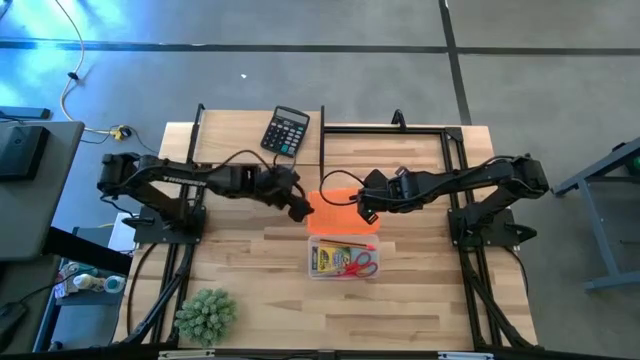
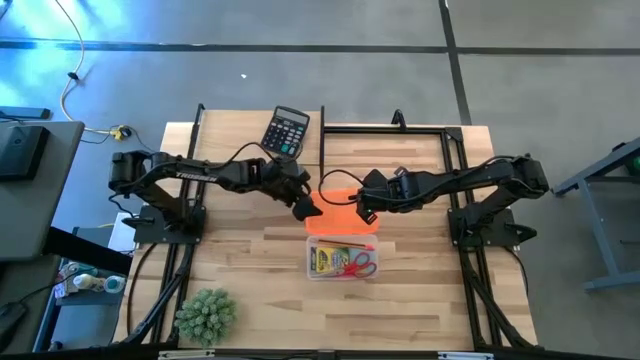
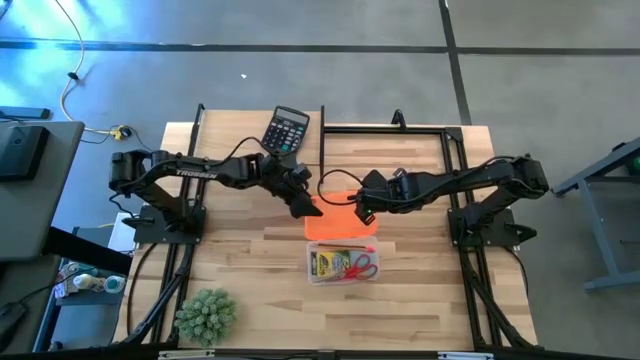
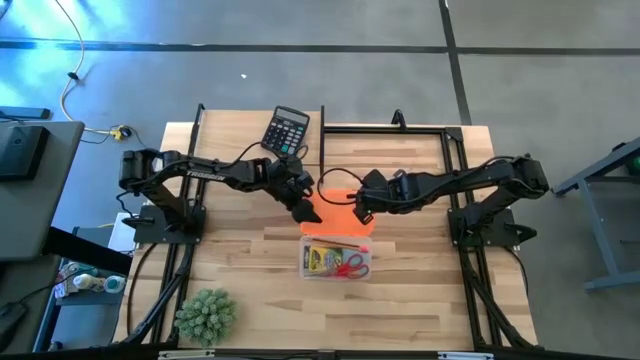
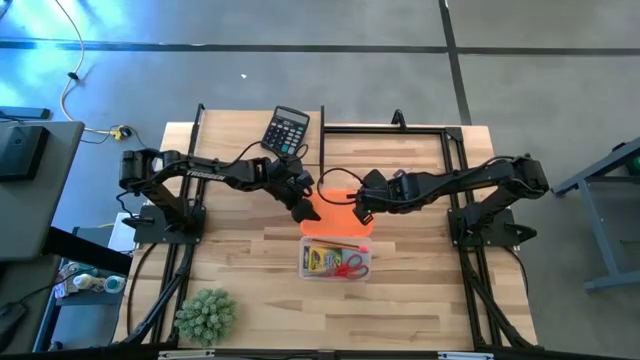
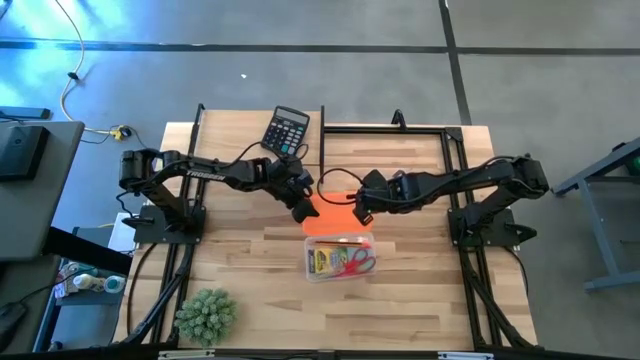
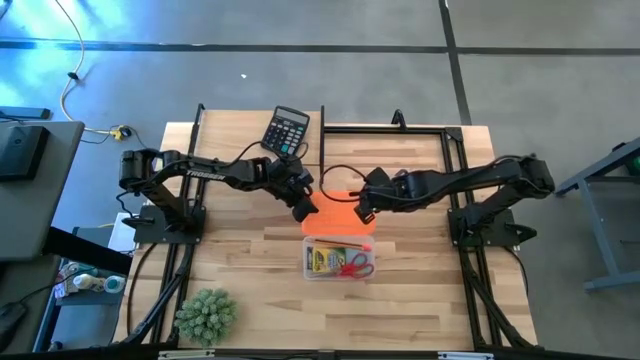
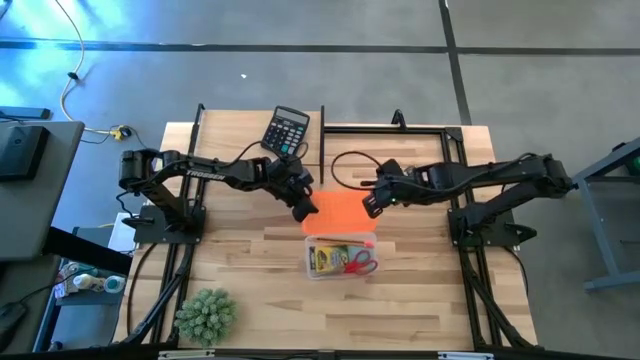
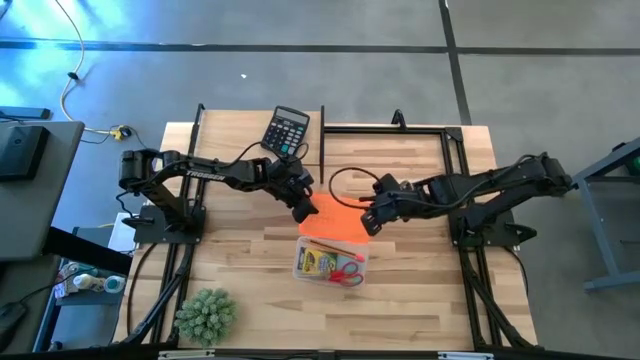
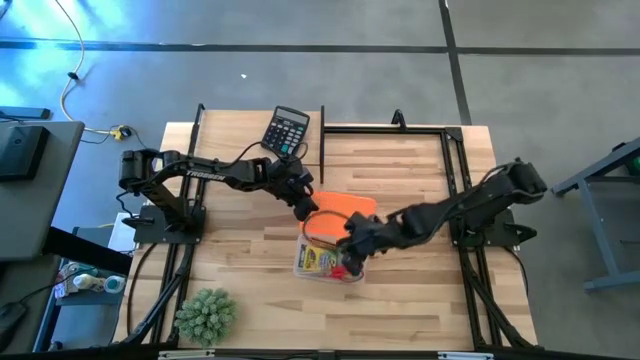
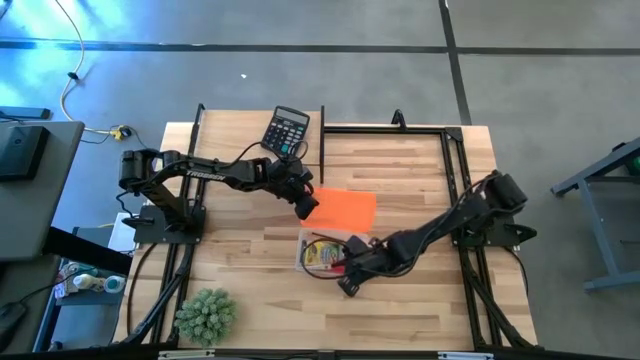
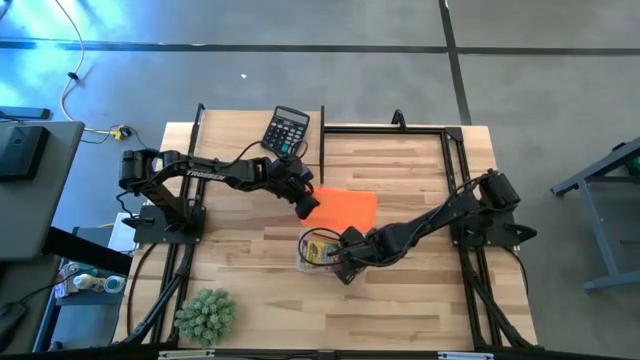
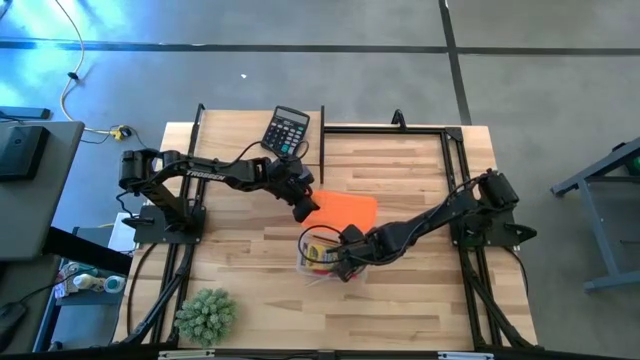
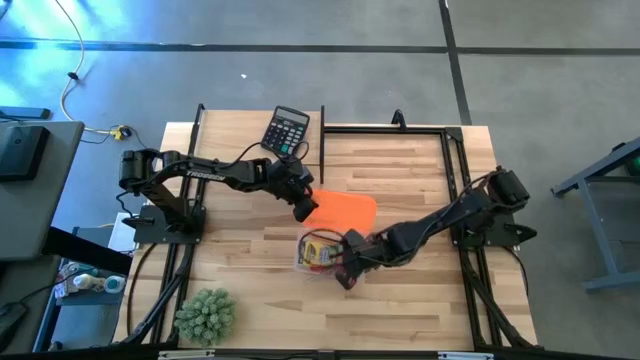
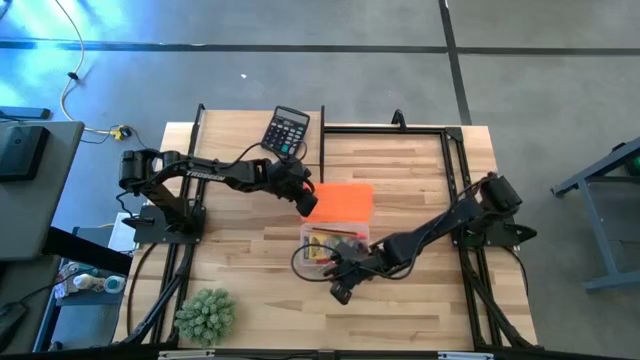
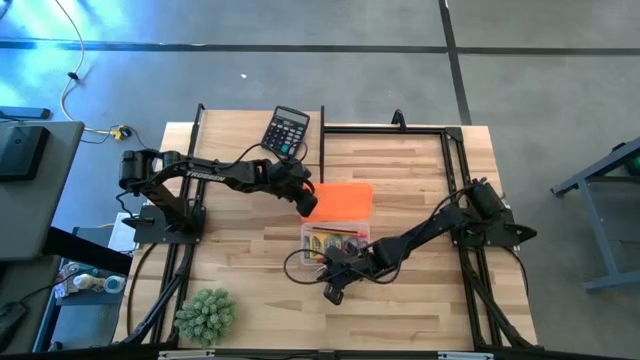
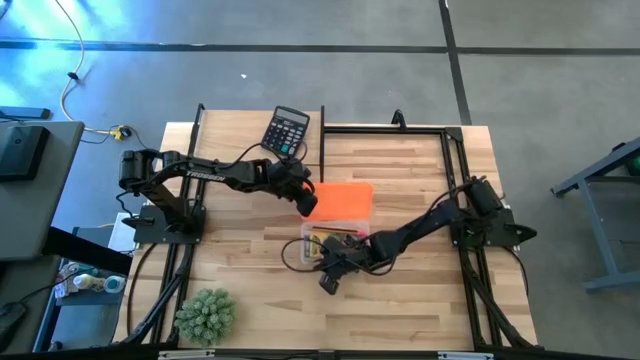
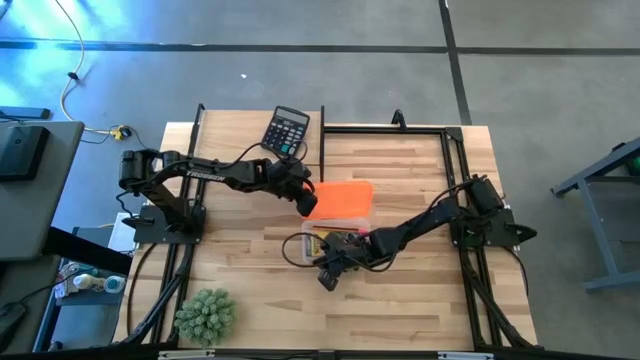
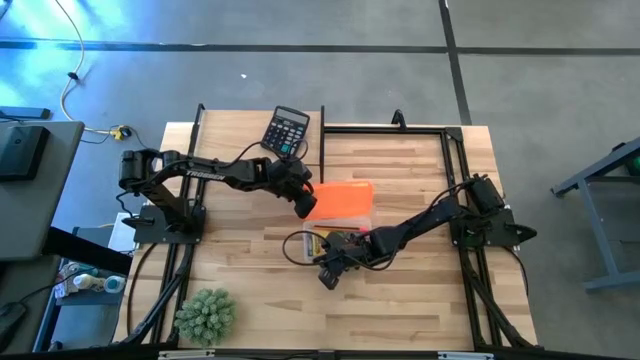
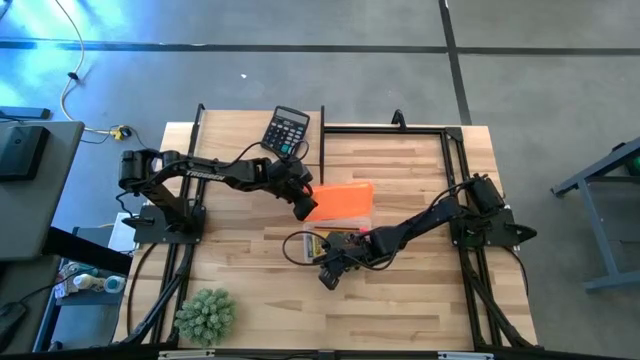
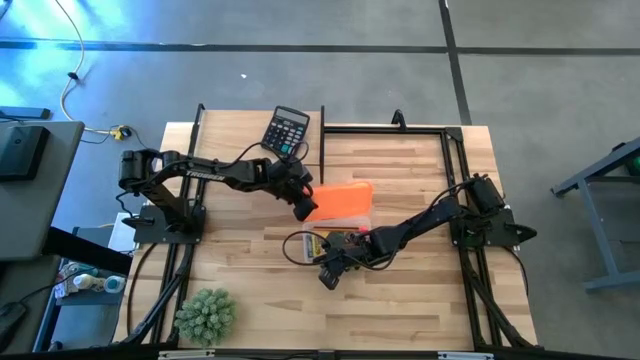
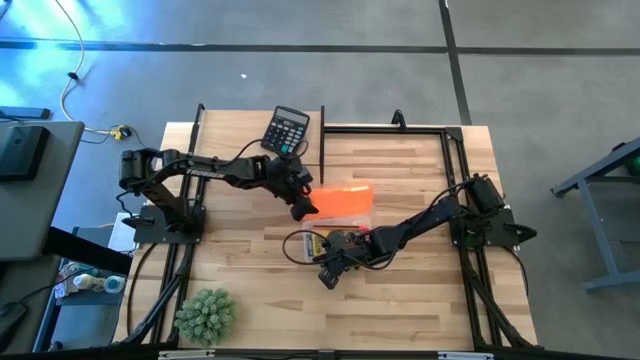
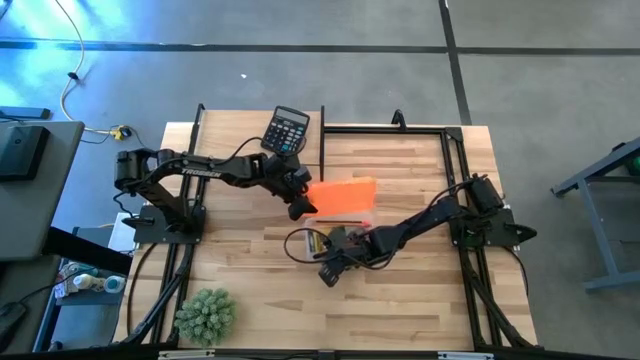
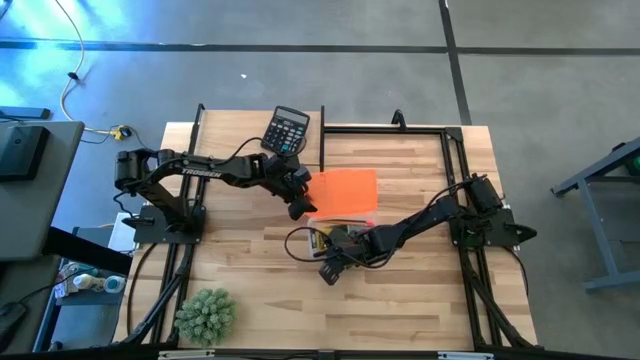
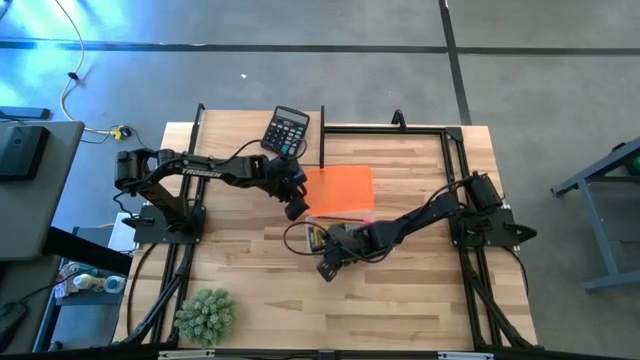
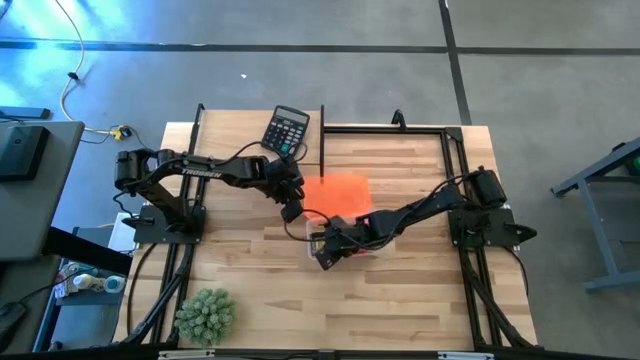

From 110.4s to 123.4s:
Task: Pack school essentials
Close the supply box

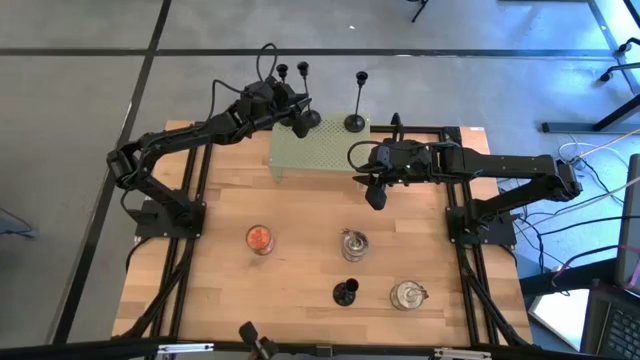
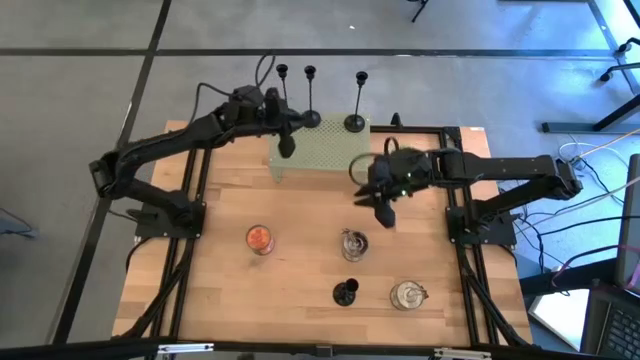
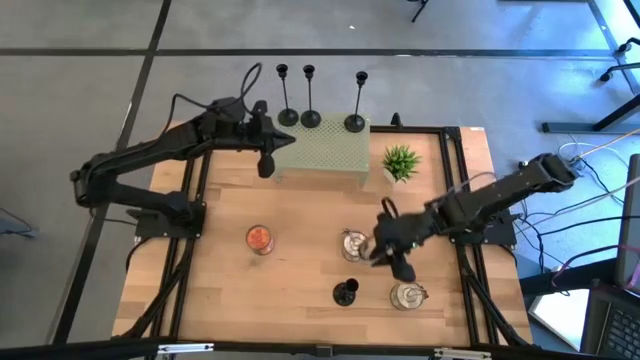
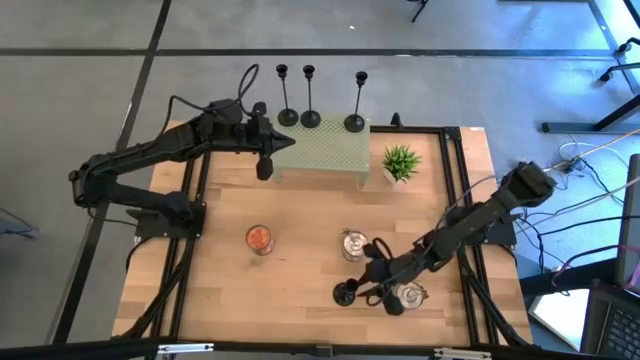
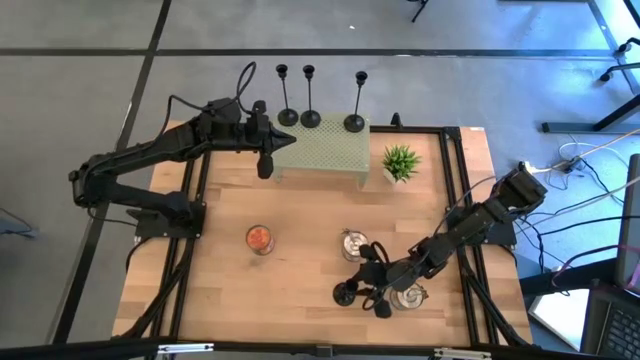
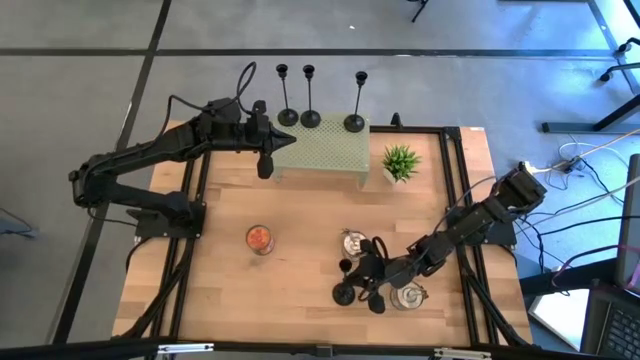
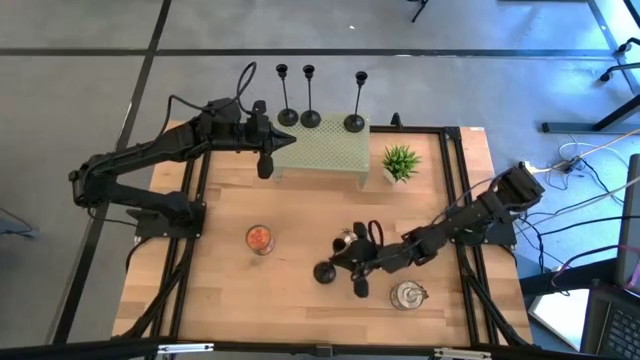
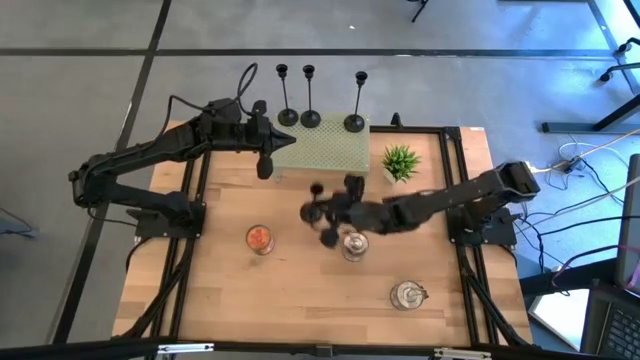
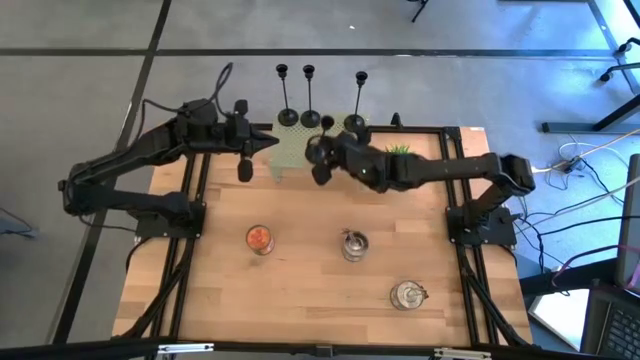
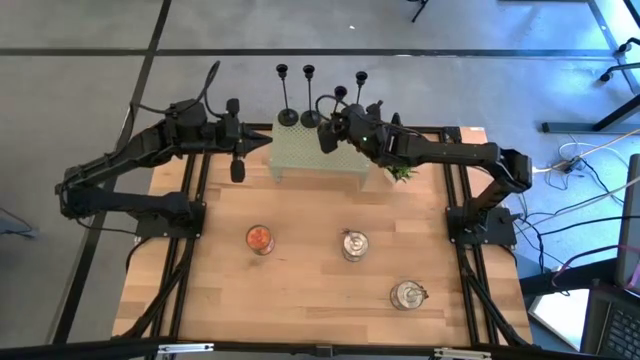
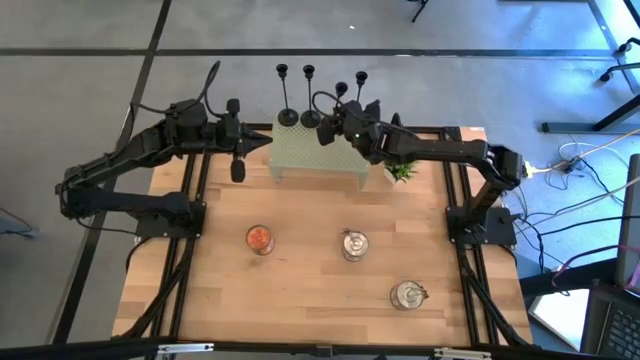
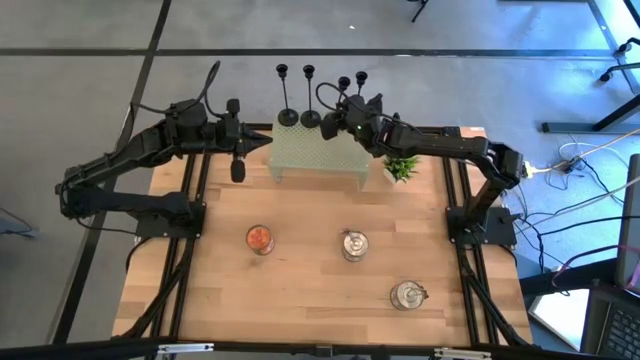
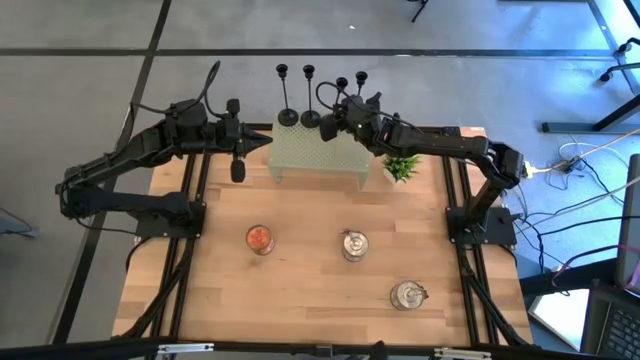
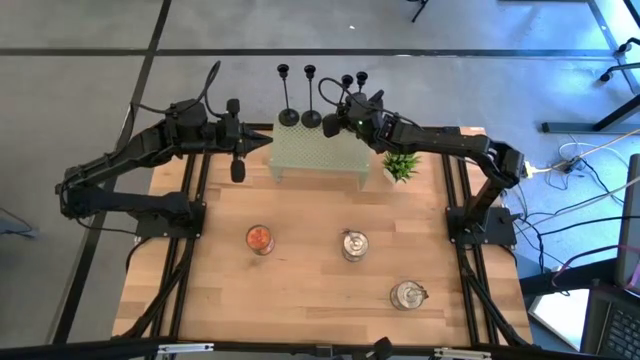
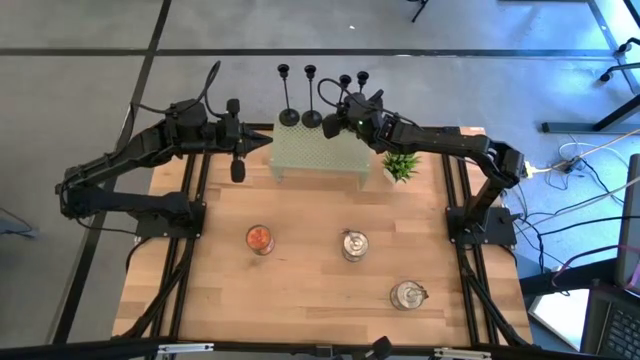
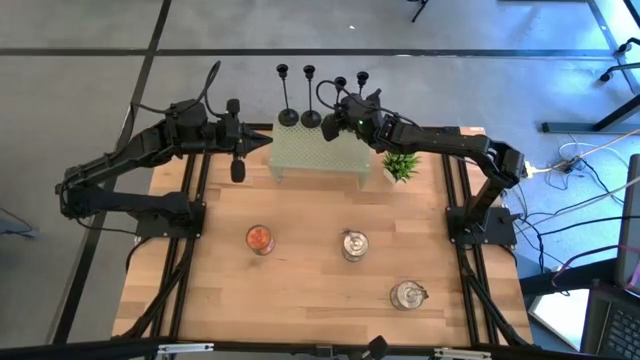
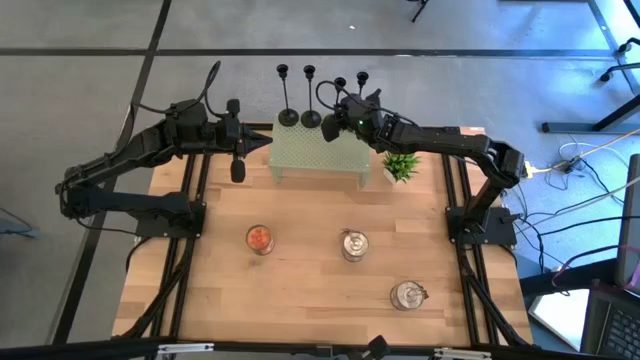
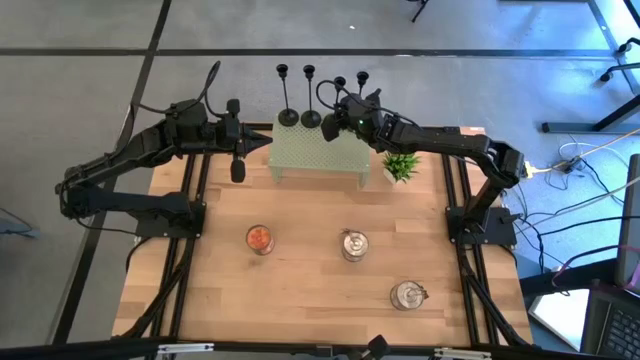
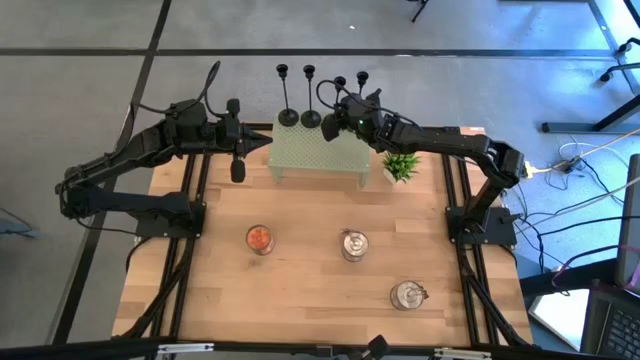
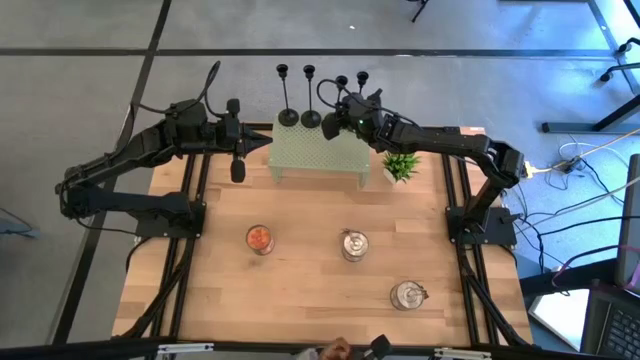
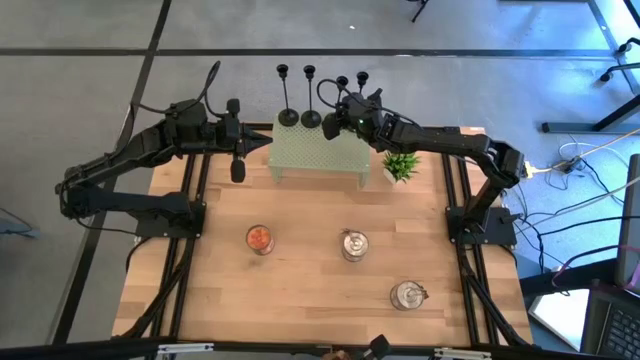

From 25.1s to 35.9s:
Task: Pick & Place candle stick holders
Put the candle holder on the shelf aligned with the other candle holders
